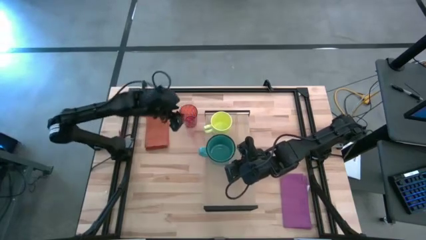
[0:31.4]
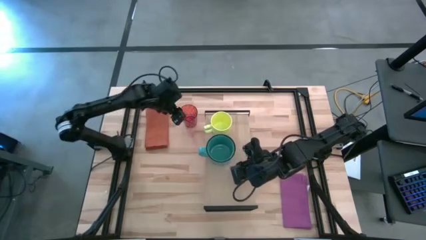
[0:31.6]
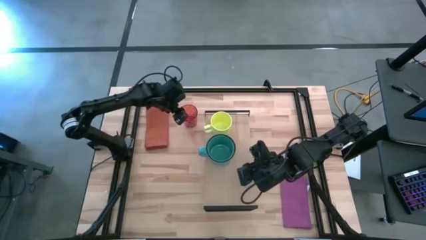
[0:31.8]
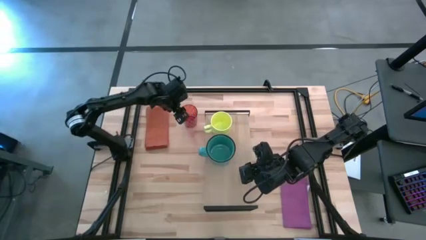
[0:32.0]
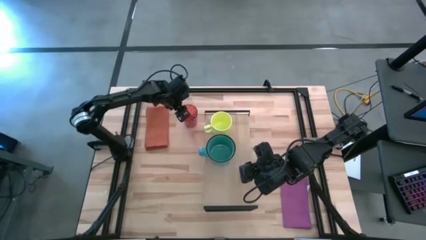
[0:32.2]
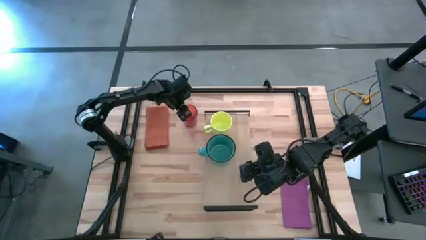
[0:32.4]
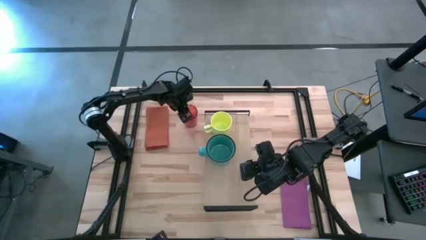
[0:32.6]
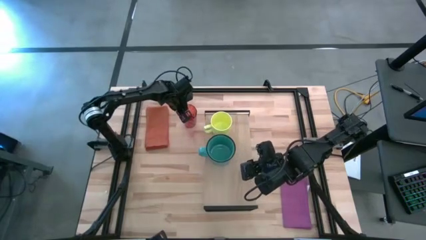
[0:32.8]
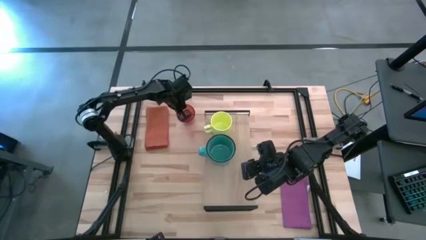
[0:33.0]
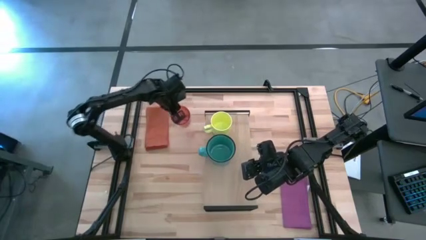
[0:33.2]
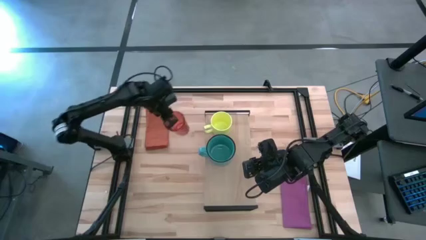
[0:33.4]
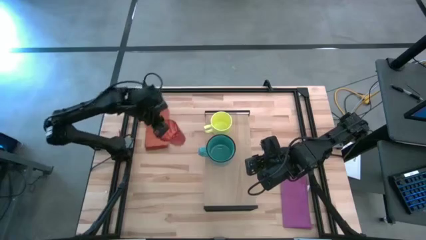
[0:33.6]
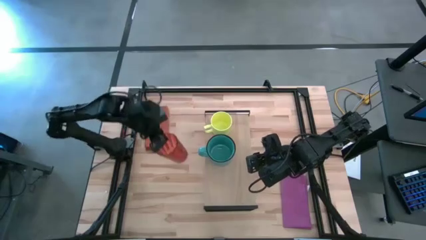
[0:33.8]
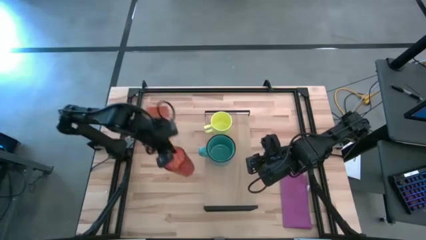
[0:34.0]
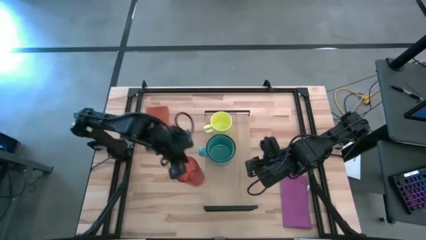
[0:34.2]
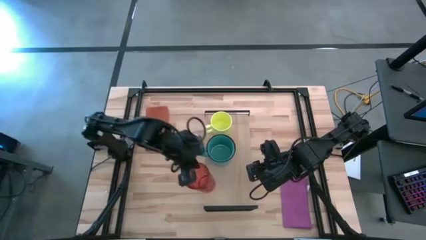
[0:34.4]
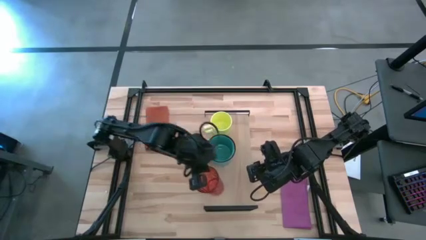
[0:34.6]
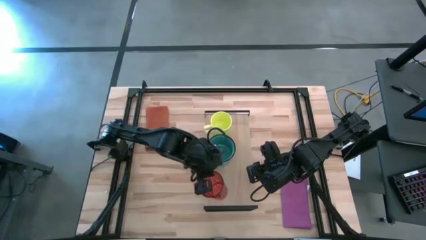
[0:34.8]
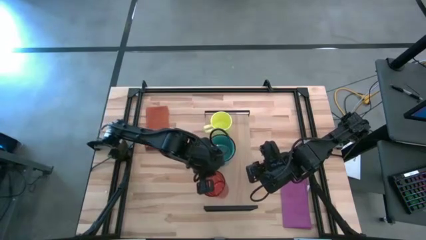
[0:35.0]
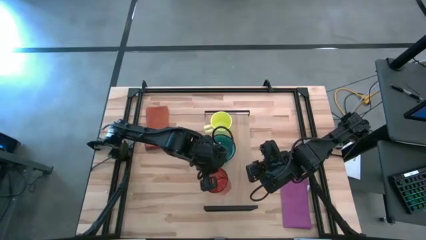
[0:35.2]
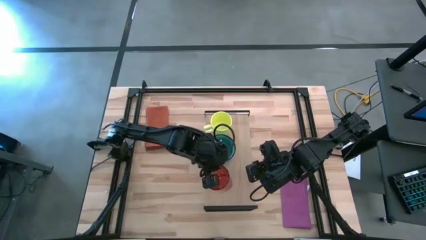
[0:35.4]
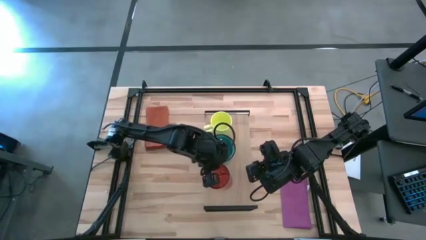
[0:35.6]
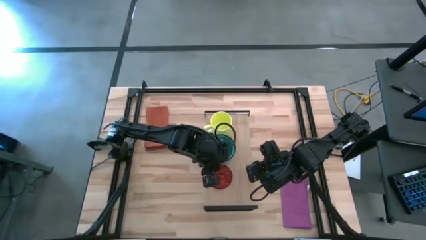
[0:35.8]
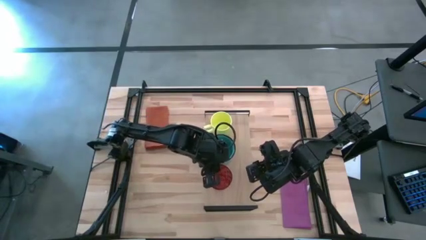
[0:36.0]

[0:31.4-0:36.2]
Task: Stack small to large cups/mugs on shelf
Put the red glass cup on the shelf

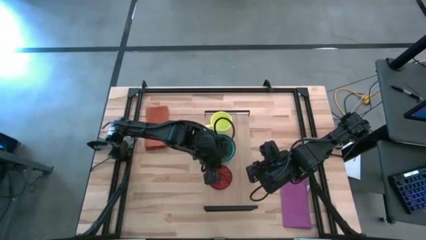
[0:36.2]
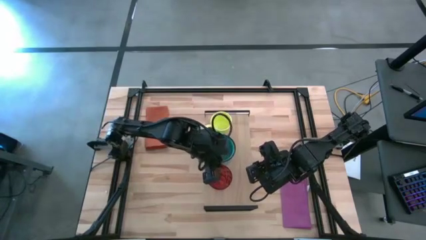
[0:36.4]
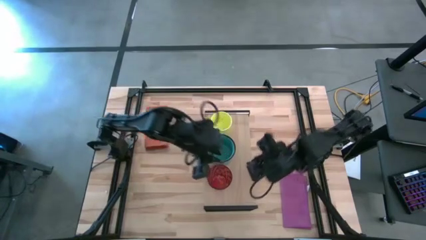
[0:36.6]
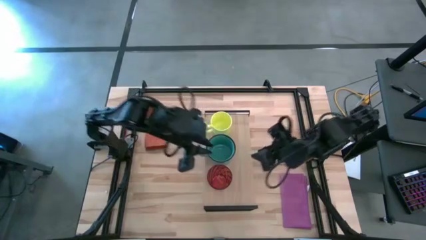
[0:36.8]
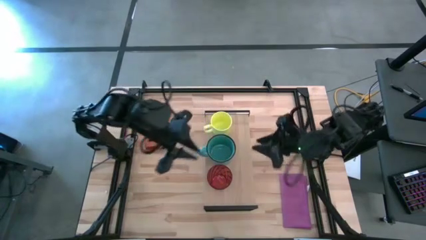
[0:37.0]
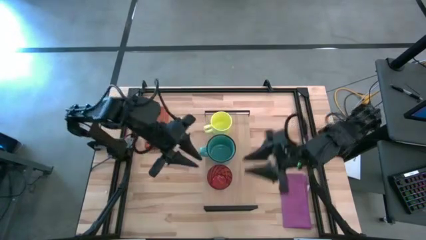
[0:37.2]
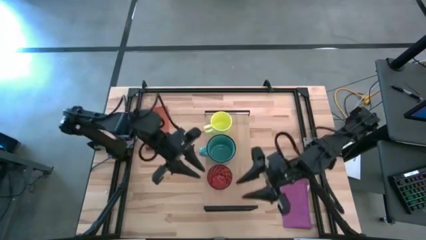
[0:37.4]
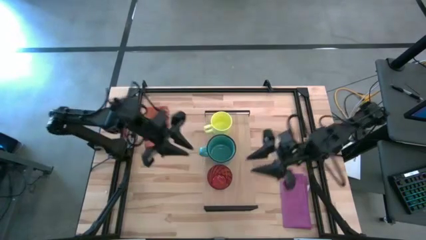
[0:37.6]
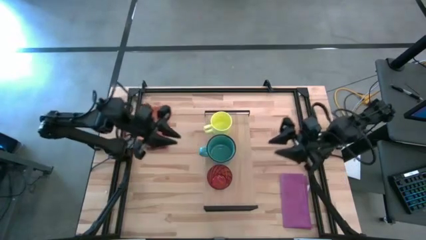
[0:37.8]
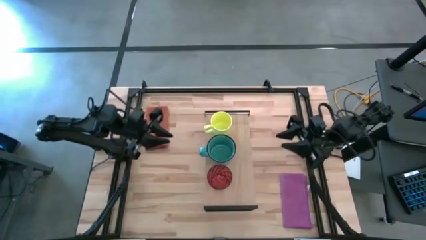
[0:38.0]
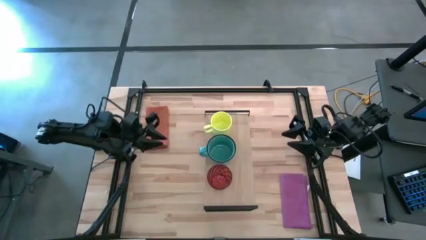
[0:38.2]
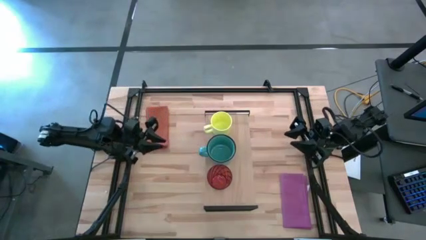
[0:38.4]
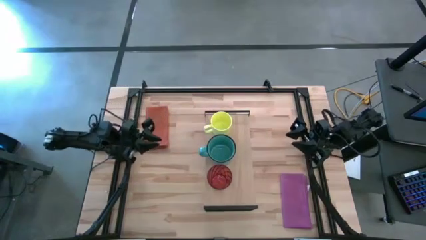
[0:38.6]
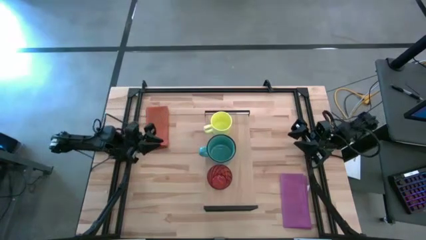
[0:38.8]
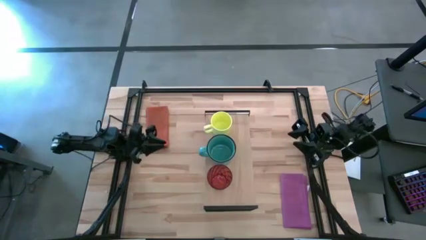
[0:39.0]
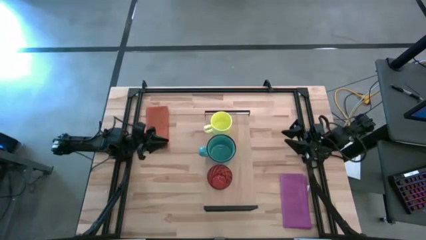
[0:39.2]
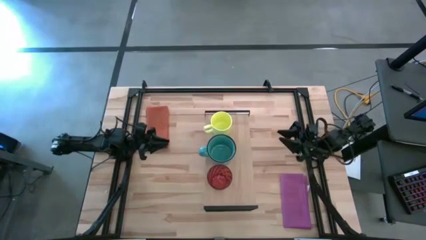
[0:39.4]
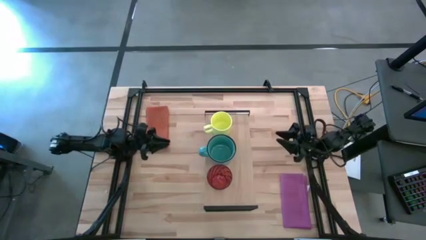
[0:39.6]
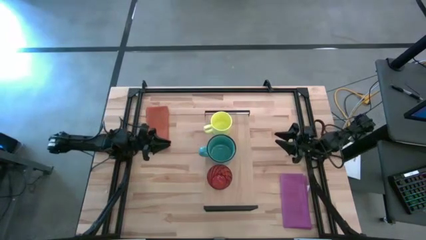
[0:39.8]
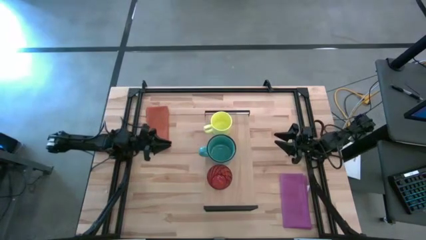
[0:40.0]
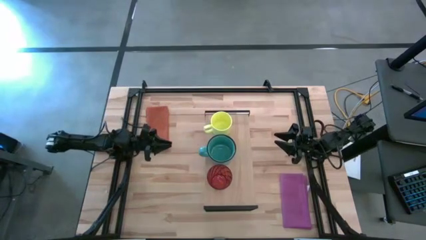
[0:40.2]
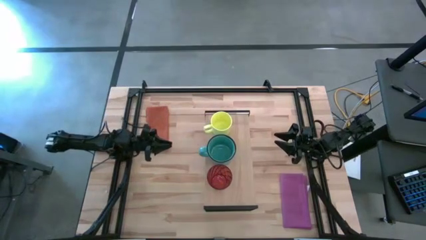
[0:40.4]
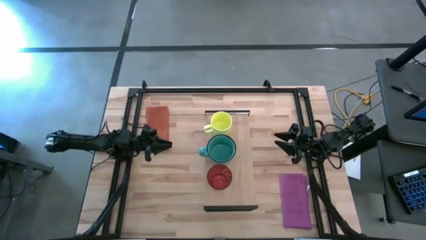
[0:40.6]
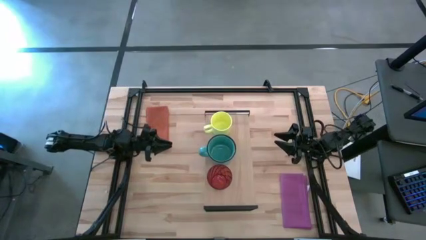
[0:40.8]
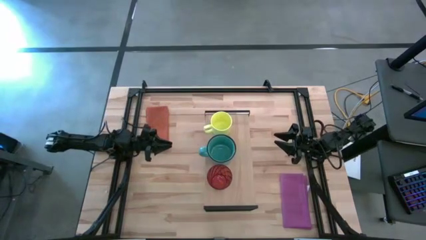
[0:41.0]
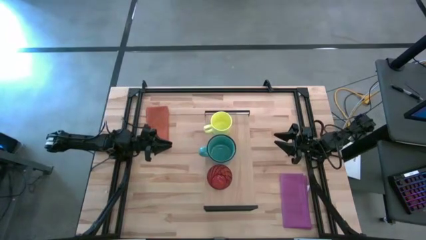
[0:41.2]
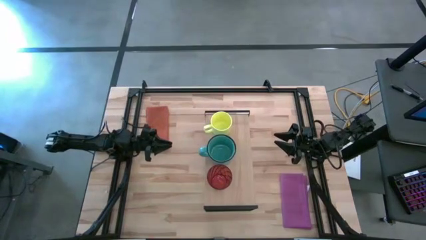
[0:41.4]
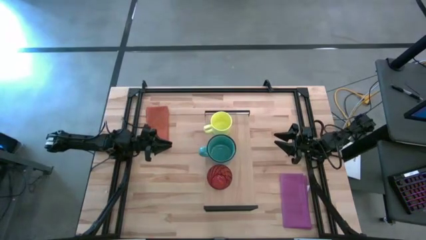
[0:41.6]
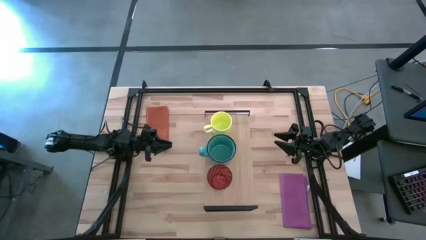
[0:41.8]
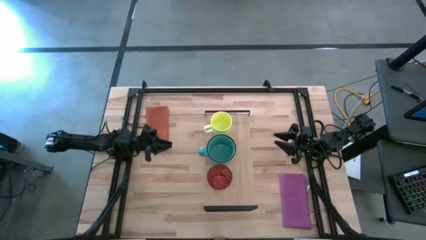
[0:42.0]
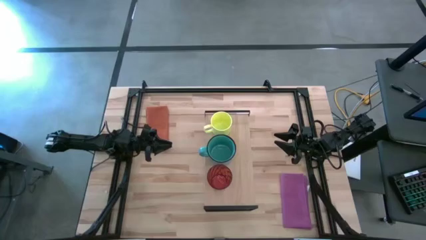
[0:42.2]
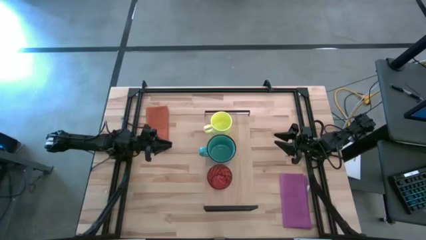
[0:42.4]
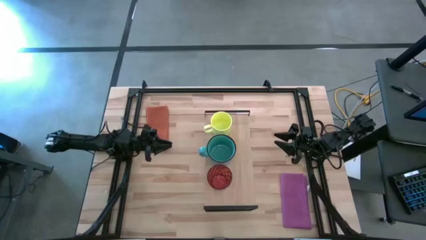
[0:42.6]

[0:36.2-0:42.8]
Return to Home Position

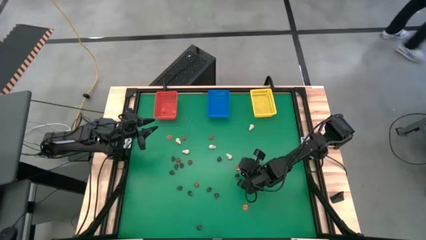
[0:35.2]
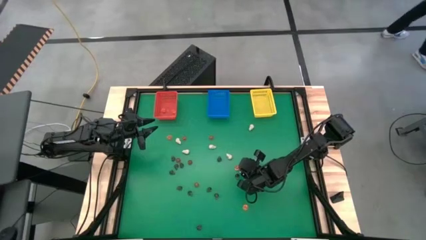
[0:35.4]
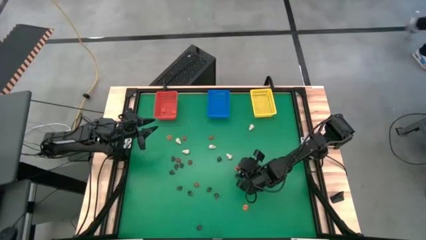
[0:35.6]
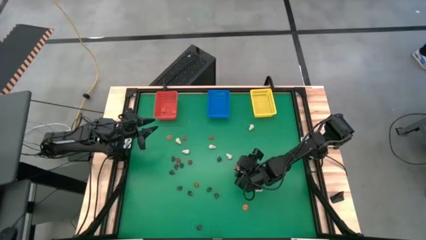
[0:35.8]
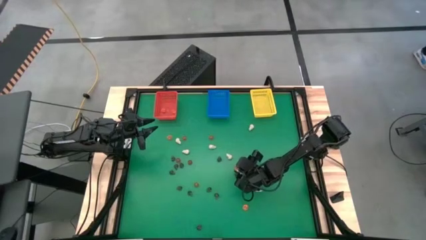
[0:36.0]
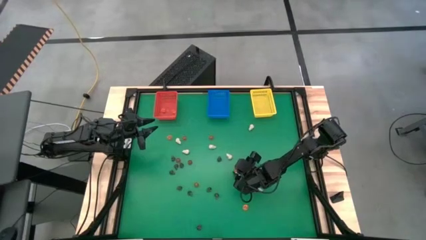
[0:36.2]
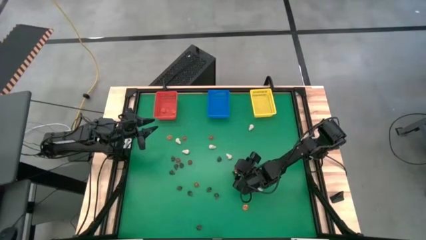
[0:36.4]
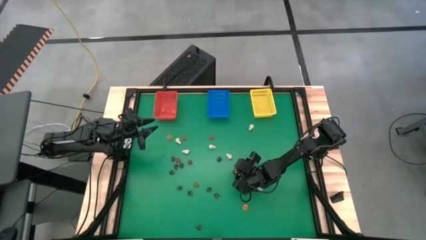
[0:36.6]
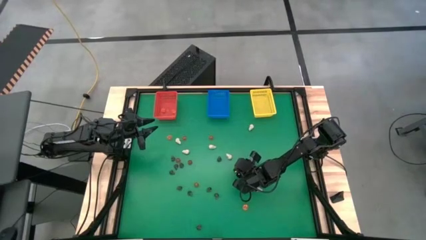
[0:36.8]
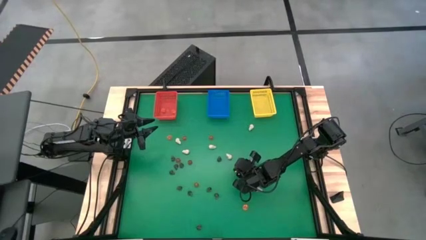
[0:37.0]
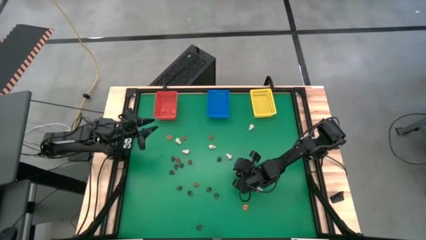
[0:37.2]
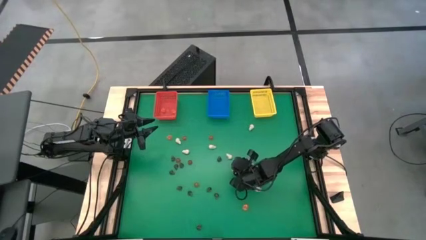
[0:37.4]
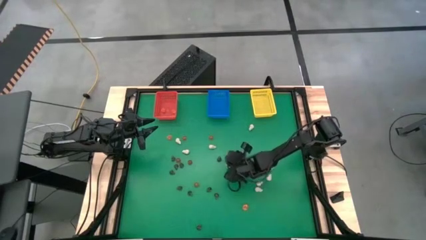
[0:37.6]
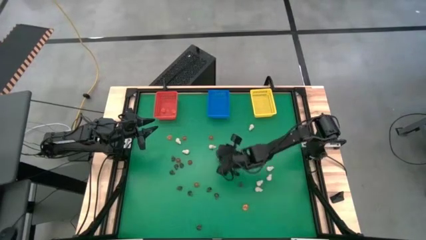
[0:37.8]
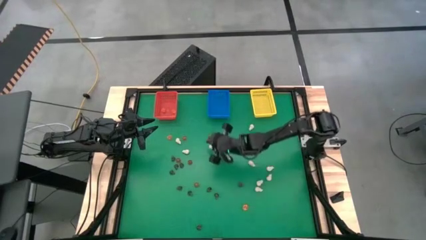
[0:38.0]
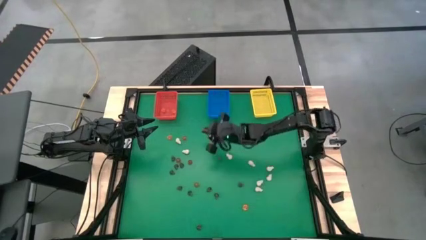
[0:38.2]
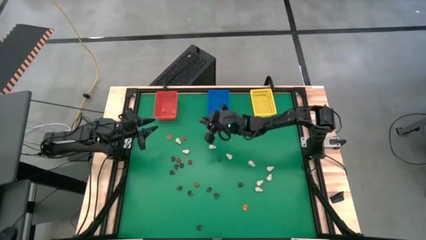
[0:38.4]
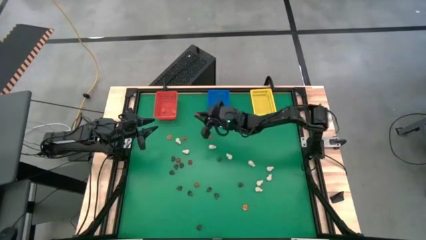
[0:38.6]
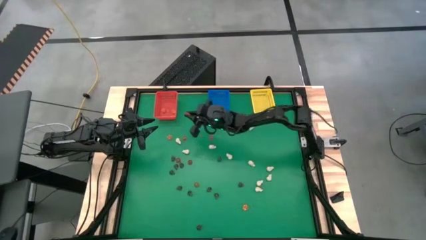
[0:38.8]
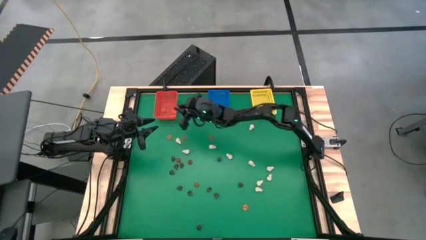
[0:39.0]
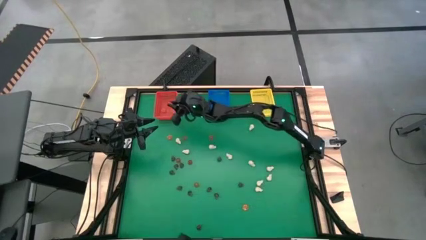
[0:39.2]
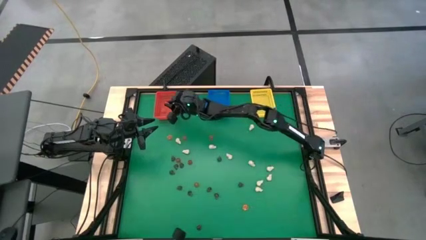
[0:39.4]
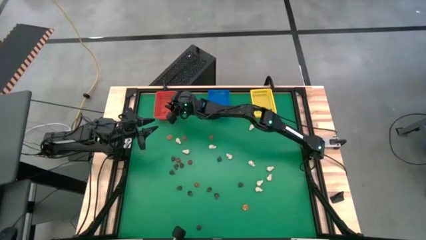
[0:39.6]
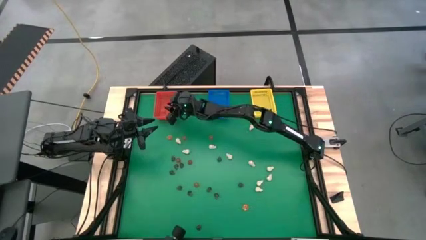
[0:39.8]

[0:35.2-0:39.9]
Task: Sort Halloween decoration
Put the orange pumpkin toy into the red bin
